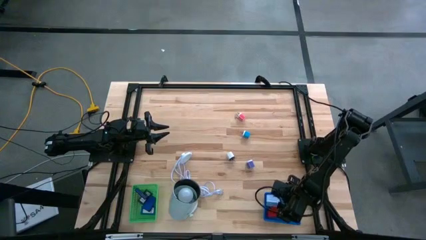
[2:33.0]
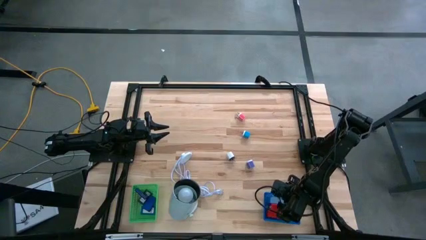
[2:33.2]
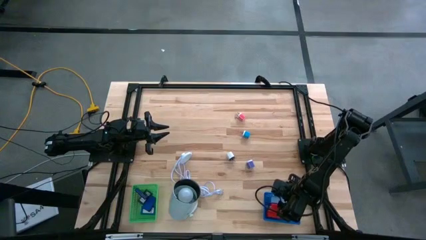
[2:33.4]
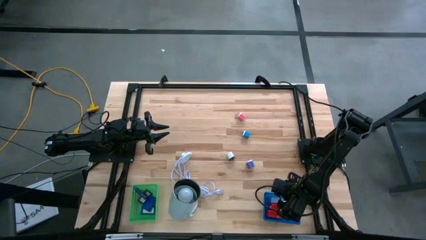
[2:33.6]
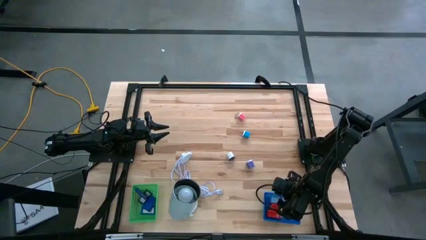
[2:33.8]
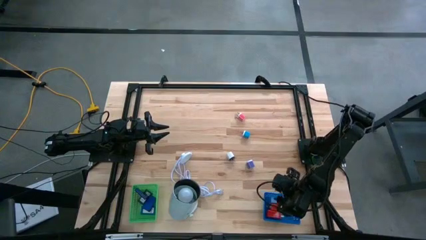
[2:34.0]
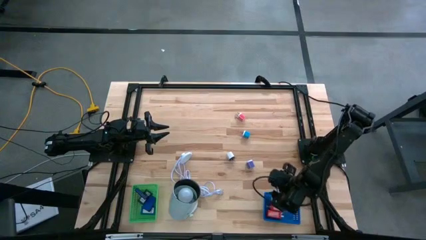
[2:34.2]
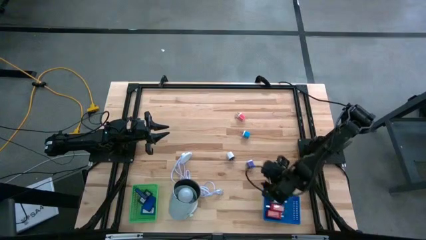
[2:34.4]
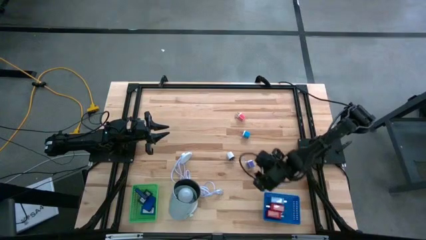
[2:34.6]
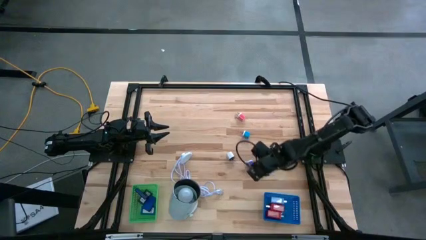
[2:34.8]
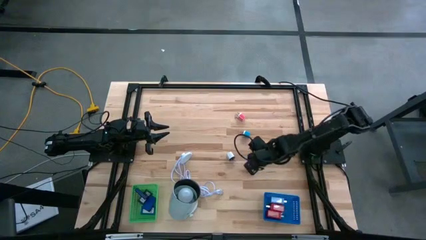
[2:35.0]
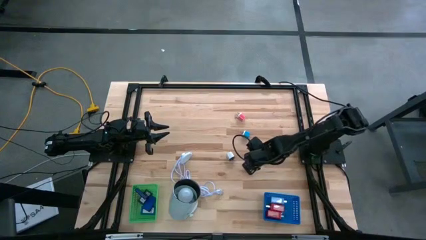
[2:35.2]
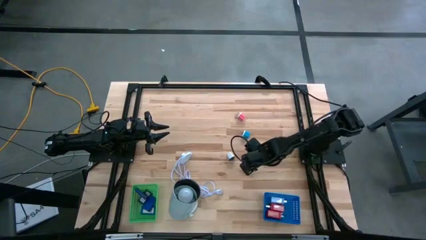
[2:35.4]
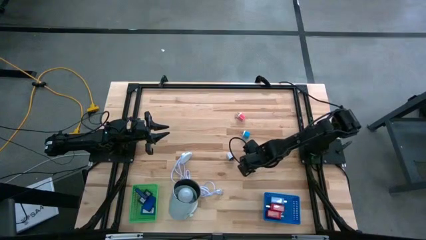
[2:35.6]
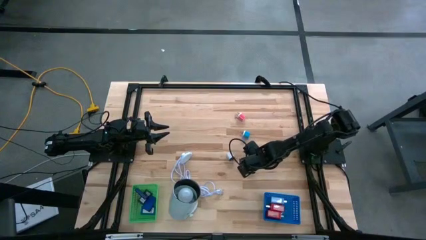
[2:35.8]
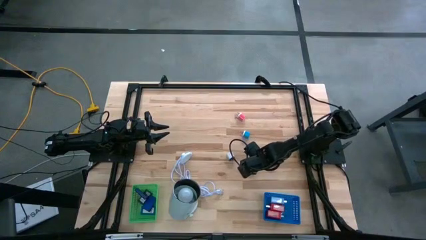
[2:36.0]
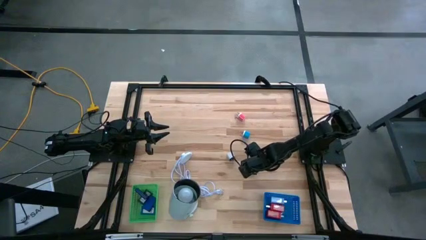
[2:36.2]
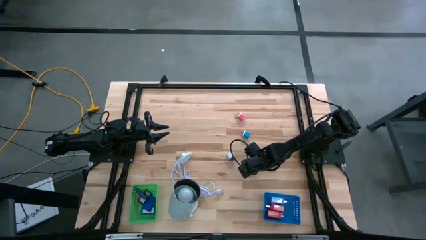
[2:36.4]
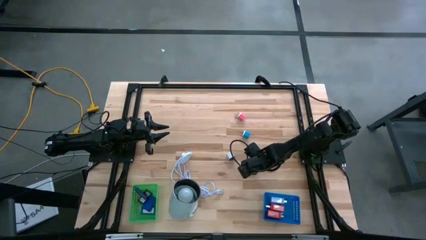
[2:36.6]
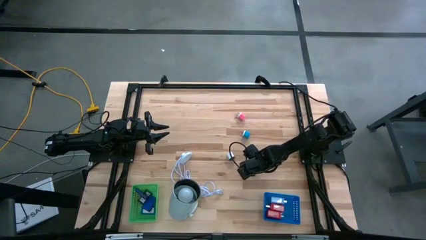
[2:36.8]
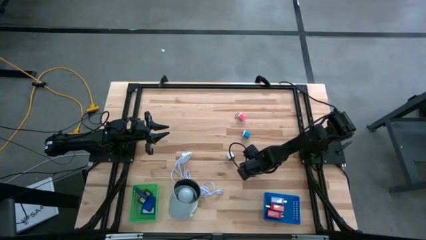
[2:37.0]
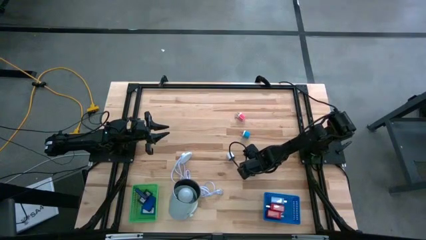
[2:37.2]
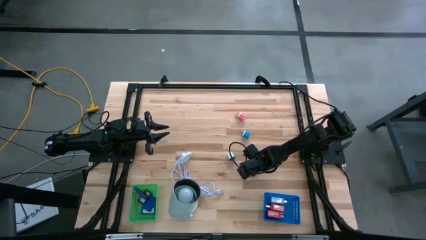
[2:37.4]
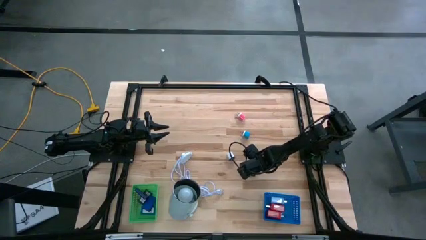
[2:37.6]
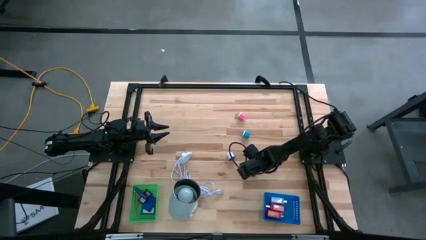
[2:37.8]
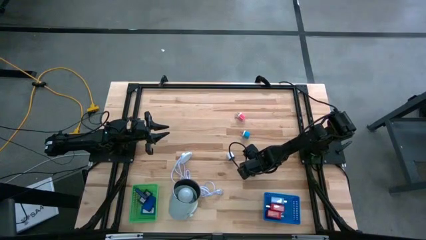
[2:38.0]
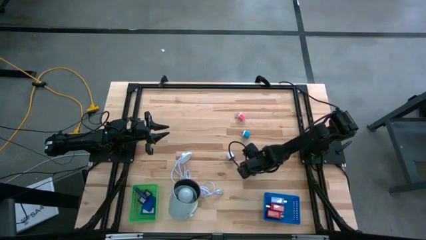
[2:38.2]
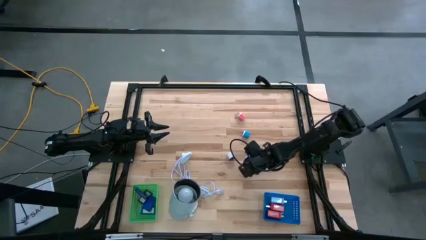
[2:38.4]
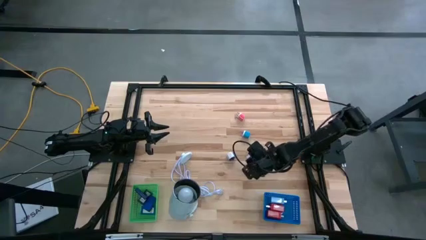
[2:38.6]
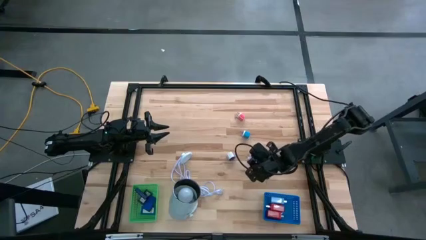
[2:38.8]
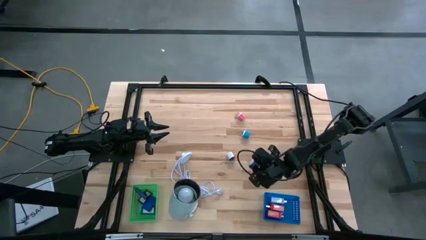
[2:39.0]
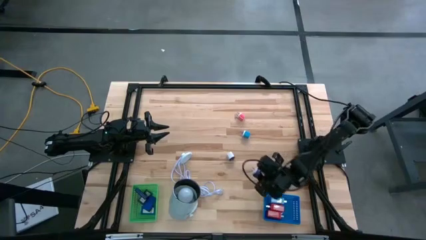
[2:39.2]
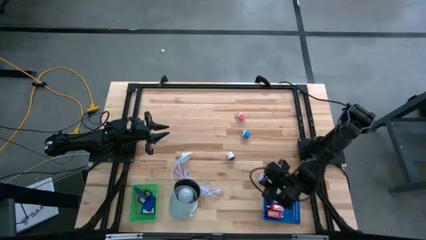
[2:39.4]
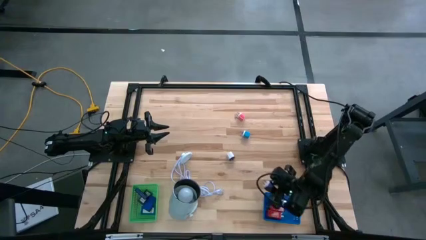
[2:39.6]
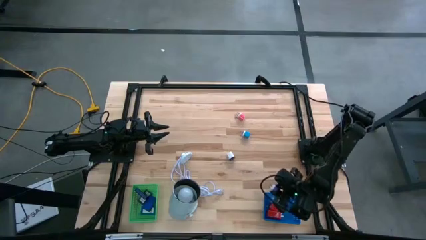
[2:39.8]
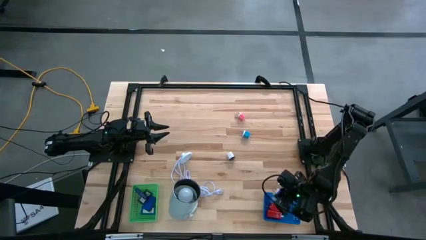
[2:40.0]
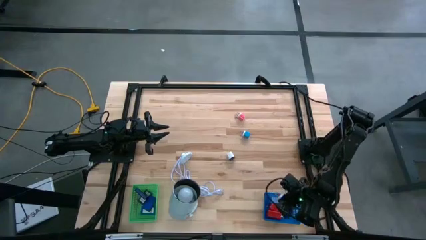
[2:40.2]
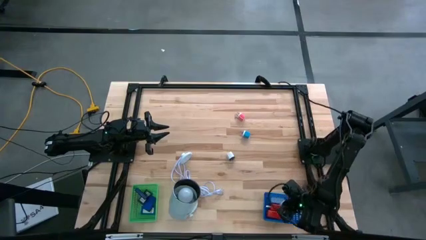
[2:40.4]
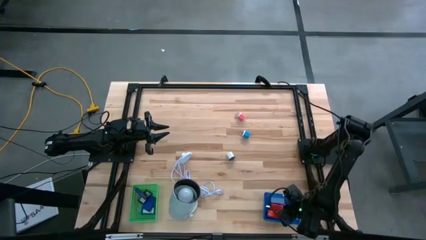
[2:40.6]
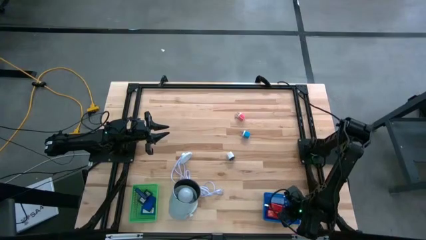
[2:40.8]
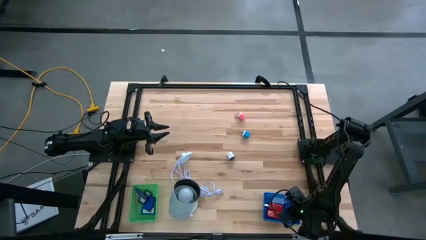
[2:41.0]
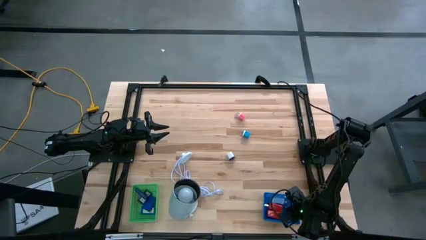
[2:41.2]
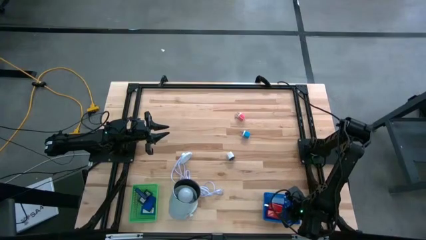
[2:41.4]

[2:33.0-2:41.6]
Task: Pick & Place Office items
Put the violet charger adapter into the blue basket

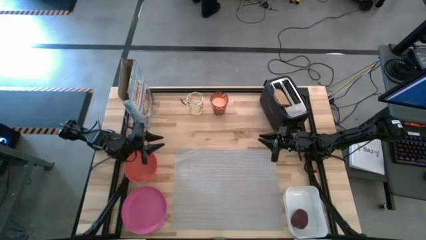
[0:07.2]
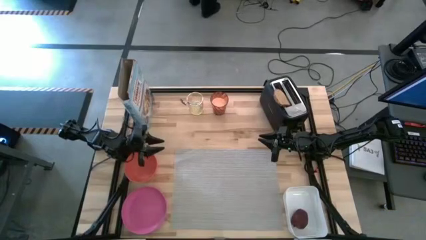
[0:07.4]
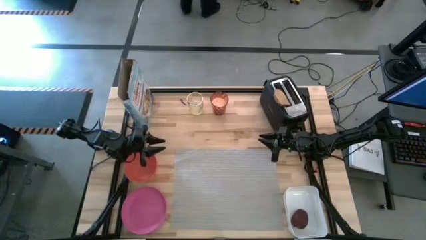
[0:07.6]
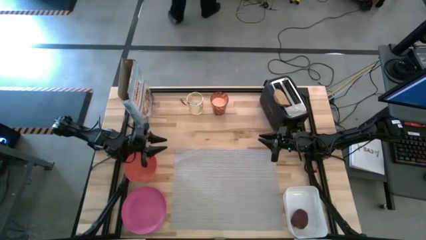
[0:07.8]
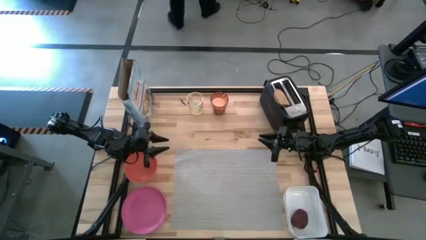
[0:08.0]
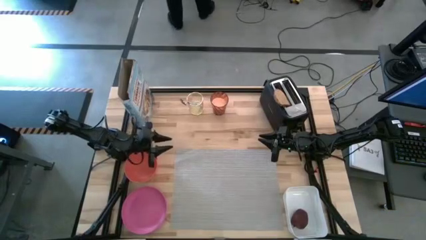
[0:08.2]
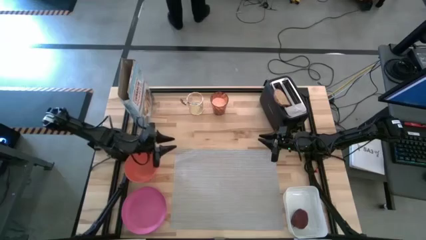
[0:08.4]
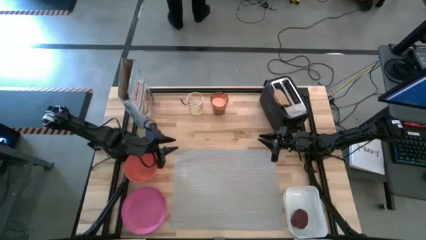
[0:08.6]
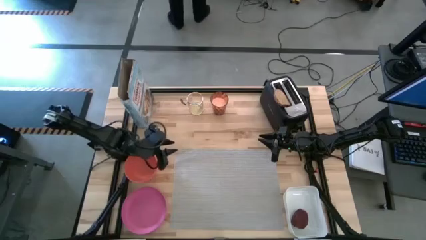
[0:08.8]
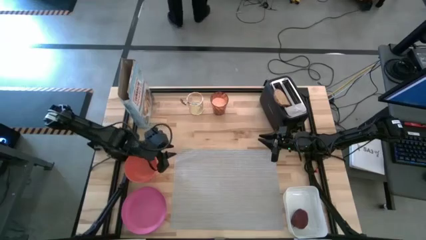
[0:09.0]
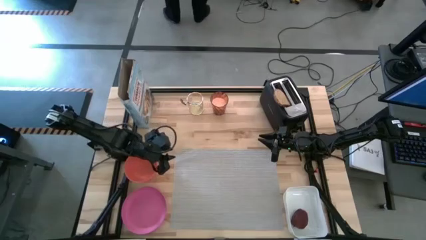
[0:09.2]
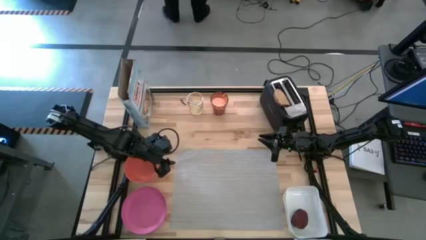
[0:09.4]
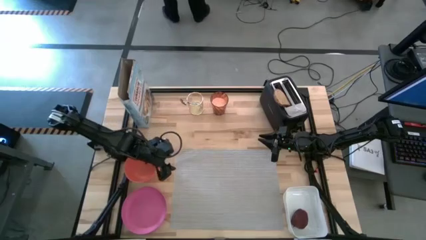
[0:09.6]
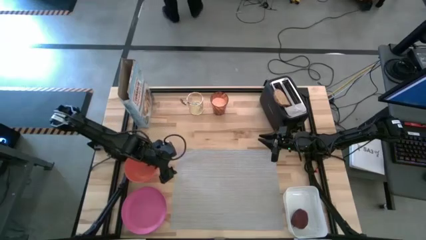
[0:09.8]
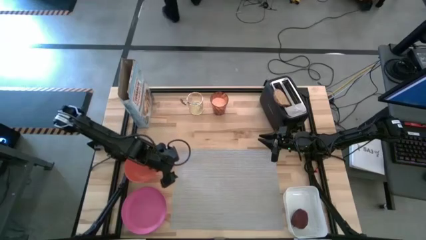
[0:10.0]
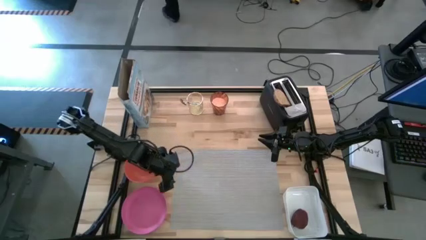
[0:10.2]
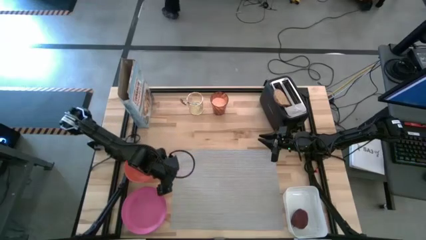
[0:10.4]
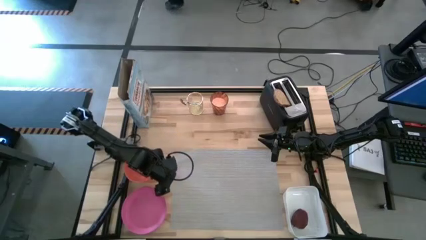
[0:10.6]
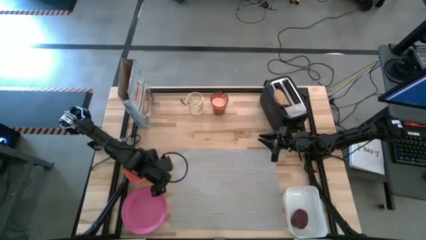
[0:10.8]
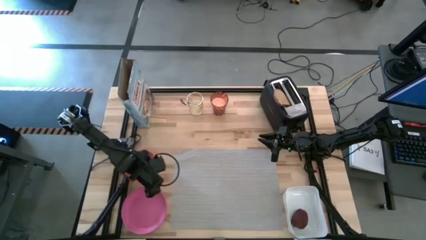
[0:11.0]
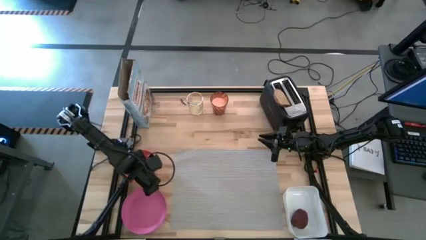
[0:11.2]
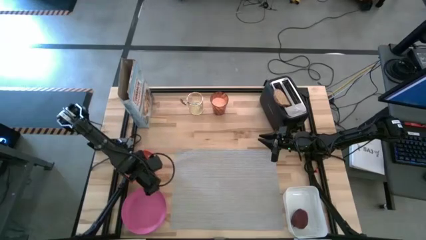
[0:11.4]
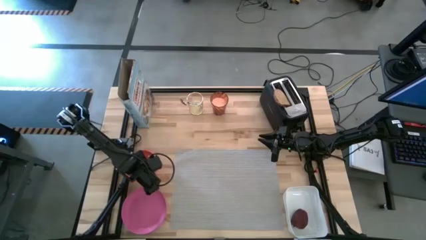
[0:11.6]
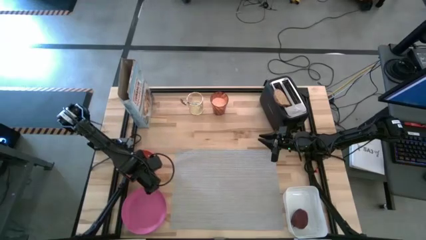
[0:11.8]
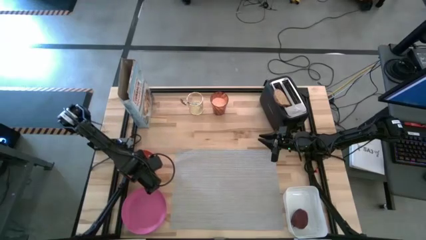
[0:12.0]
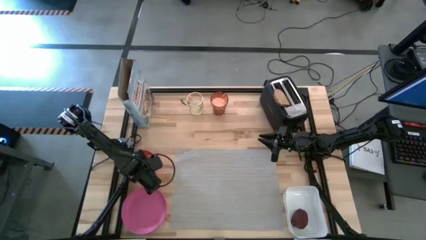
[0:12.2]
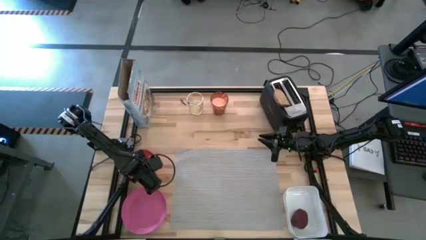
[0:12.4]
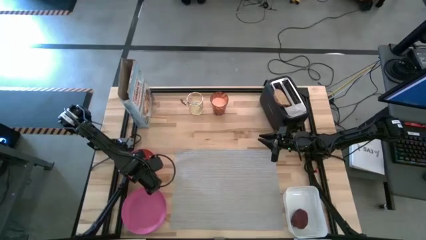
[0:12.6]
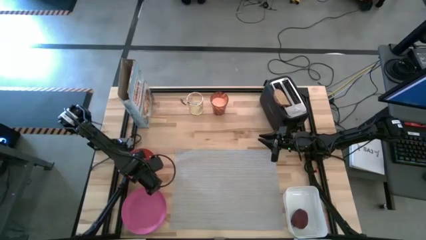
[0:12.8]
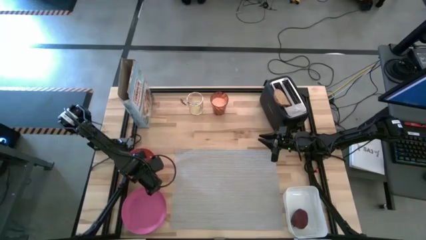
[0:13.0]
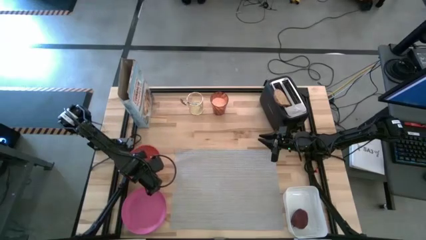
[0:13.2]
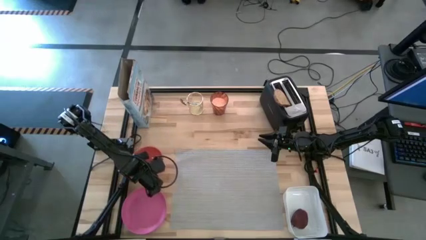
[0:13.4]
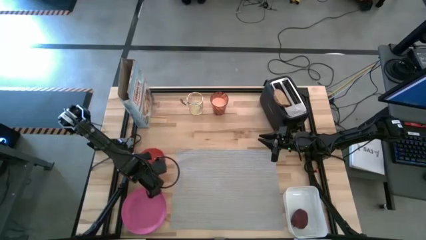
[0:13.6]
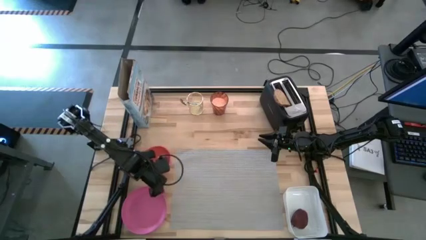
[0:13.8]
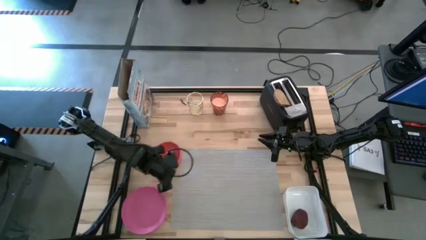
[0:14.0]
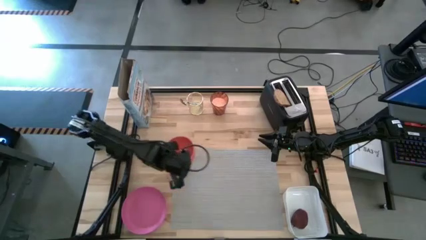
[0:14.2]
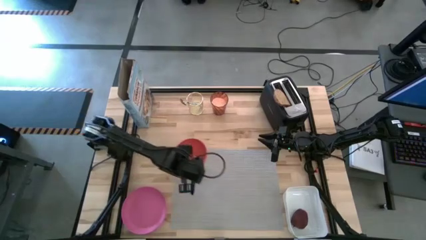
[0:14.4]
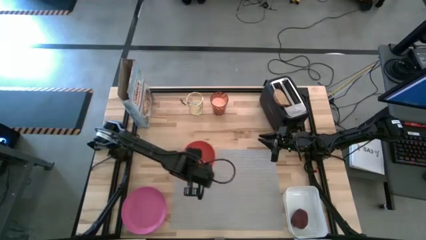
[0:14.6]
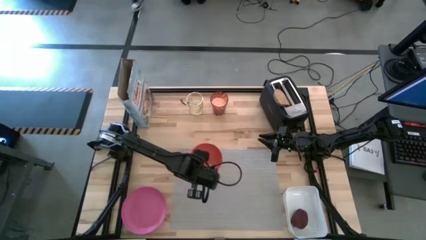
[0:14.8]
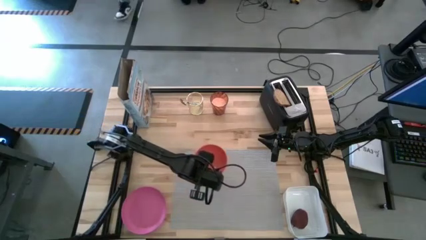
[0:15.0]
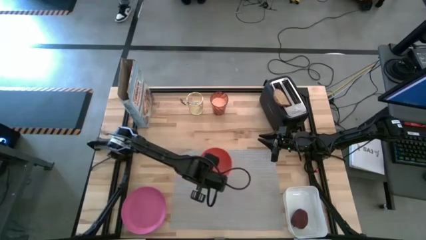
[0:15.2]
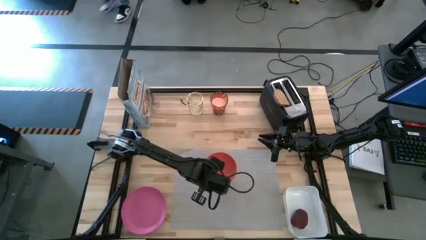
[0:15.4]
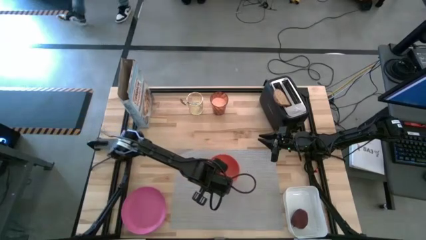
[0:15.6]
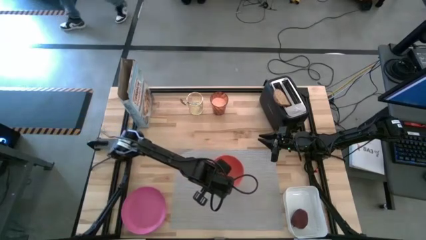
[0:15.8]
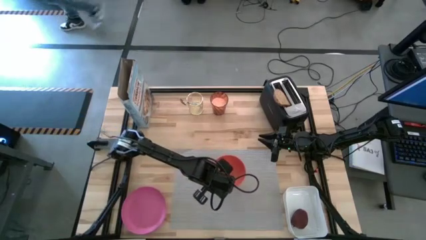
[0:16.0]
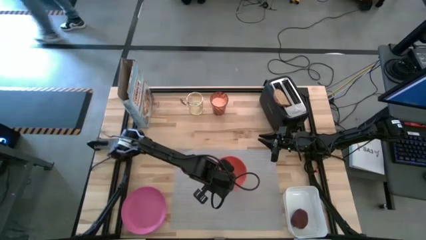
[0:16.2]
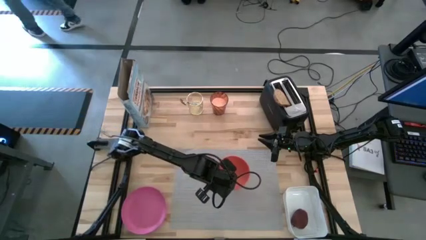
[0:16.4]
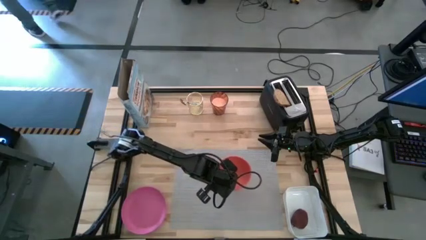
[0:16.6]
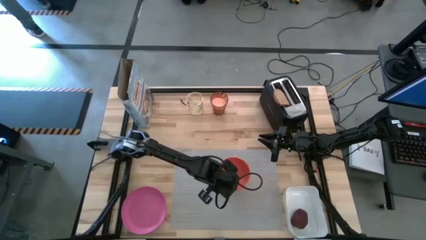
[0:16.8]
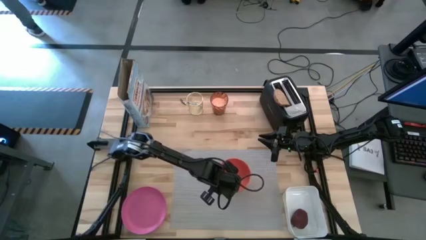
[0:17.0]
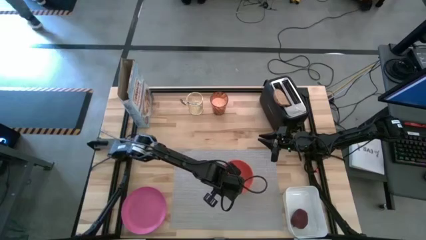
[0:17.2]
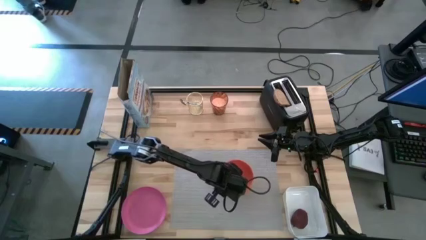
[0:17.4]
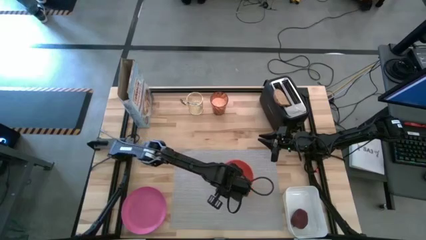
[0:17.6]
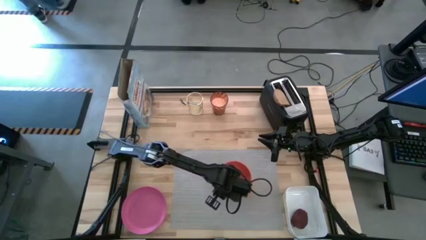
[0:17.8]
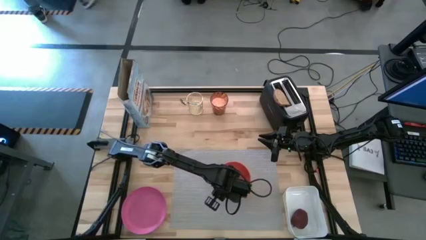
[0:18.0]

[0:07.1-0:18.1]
Task: Arrange a breakfast setting
Put the red bowl on the gray placemat
